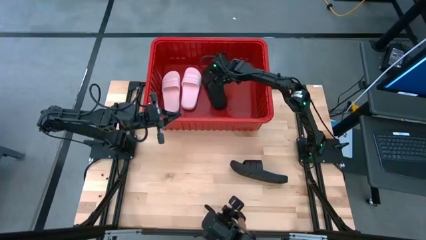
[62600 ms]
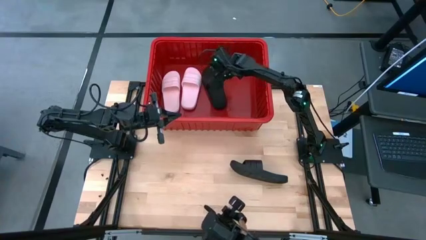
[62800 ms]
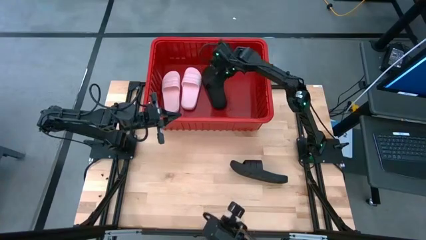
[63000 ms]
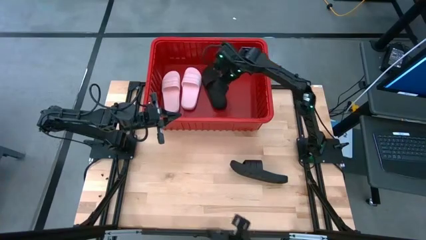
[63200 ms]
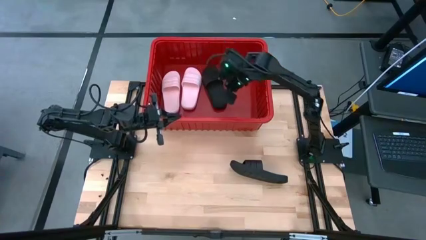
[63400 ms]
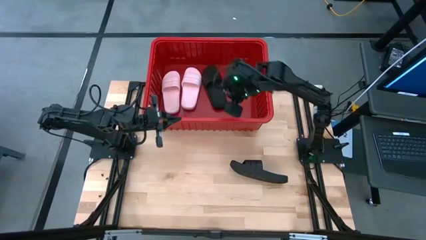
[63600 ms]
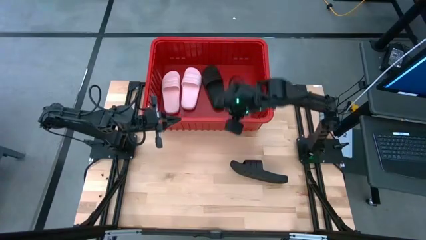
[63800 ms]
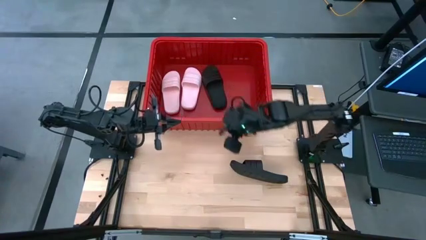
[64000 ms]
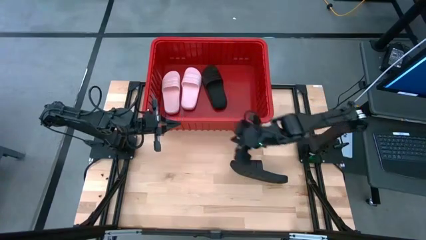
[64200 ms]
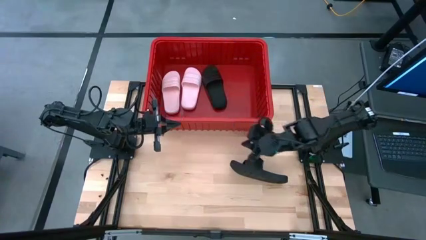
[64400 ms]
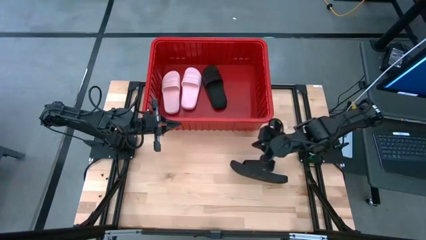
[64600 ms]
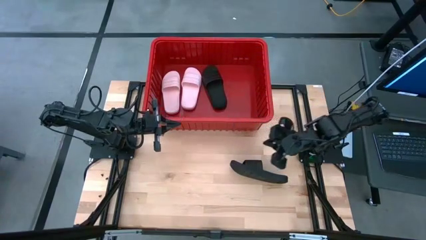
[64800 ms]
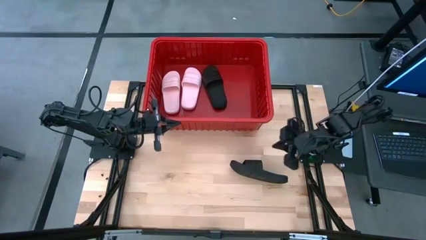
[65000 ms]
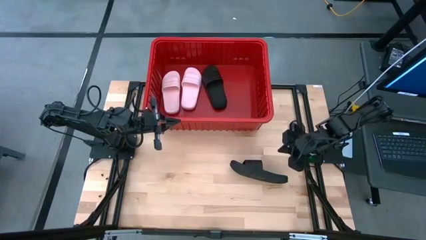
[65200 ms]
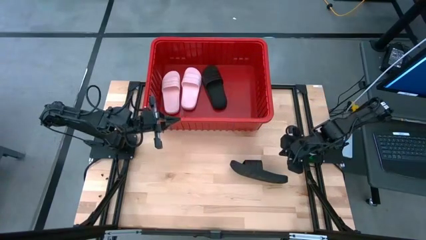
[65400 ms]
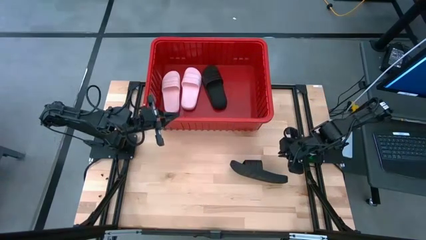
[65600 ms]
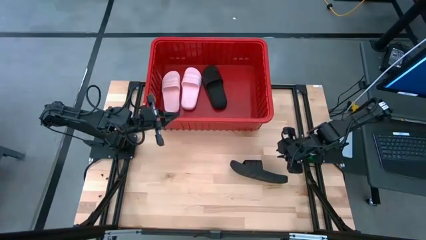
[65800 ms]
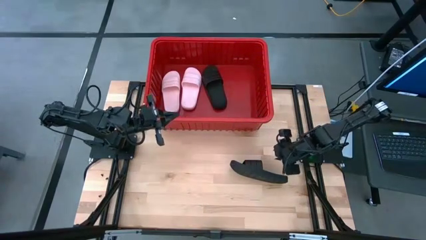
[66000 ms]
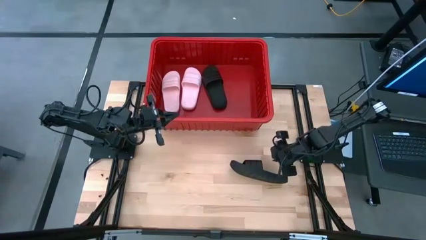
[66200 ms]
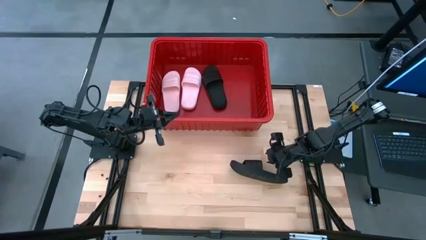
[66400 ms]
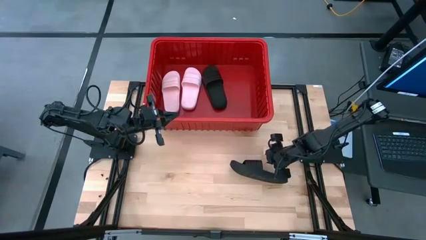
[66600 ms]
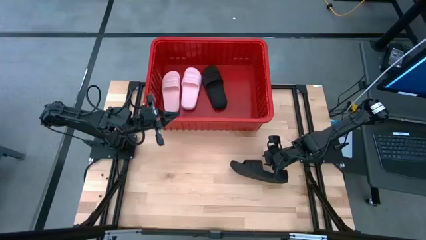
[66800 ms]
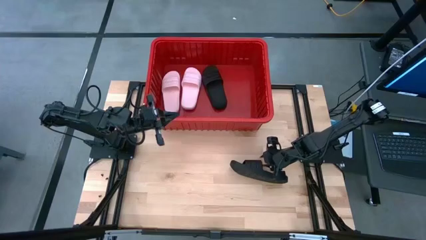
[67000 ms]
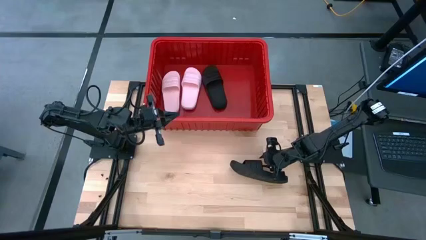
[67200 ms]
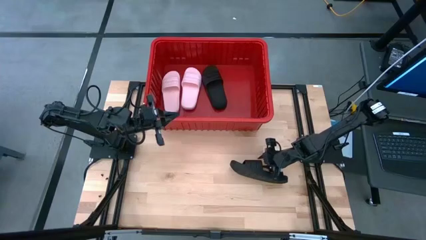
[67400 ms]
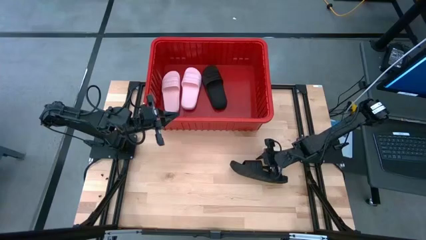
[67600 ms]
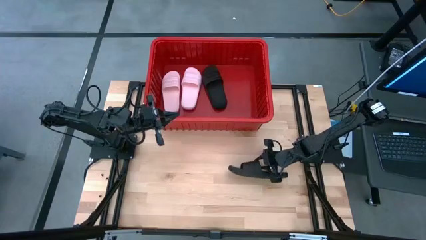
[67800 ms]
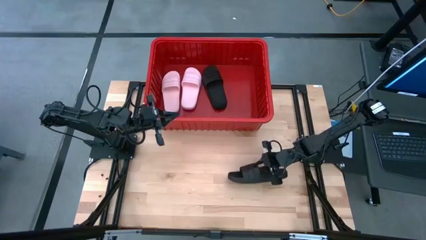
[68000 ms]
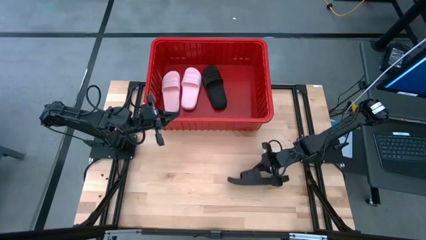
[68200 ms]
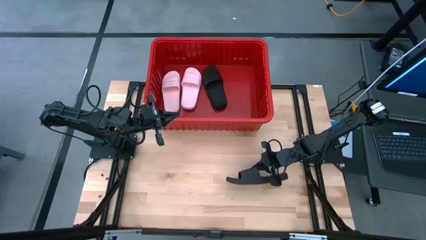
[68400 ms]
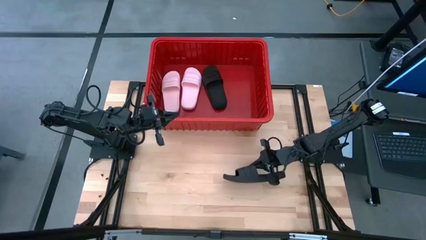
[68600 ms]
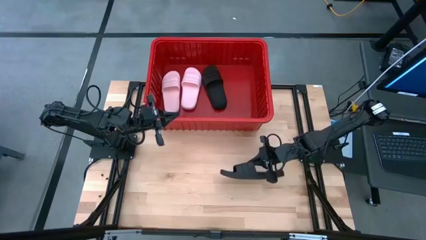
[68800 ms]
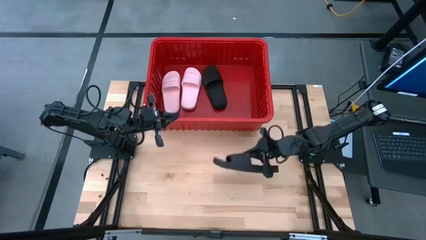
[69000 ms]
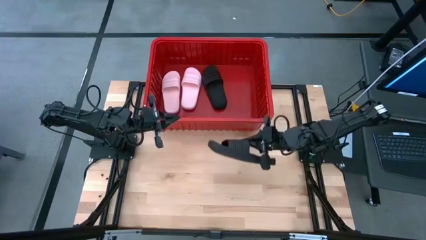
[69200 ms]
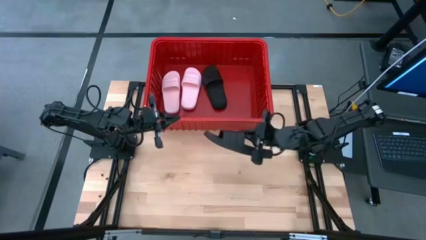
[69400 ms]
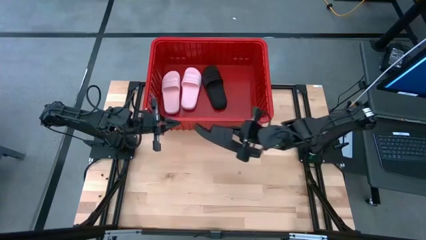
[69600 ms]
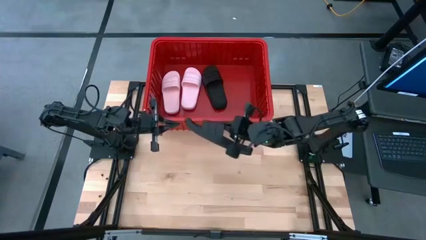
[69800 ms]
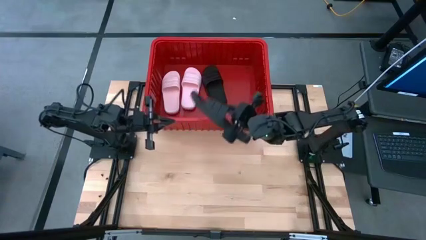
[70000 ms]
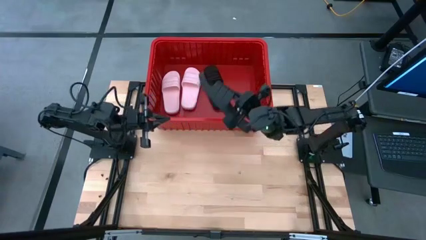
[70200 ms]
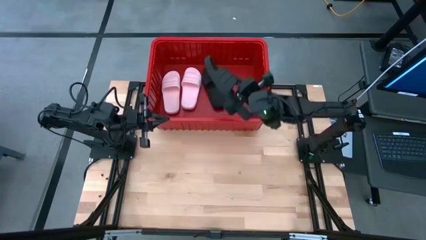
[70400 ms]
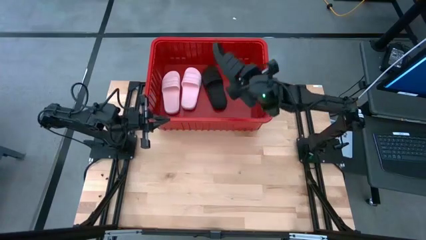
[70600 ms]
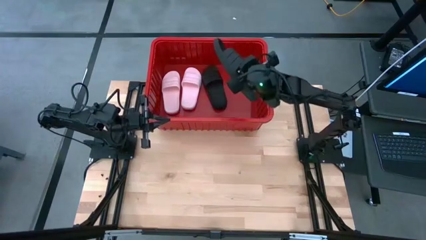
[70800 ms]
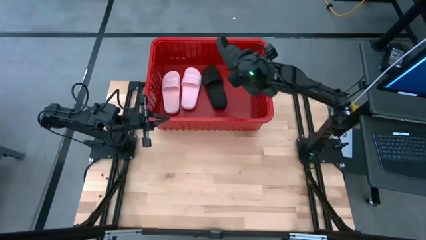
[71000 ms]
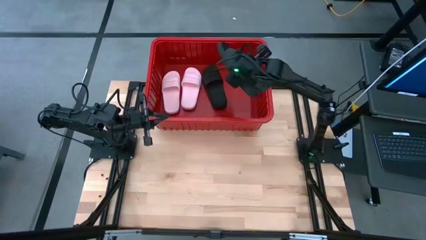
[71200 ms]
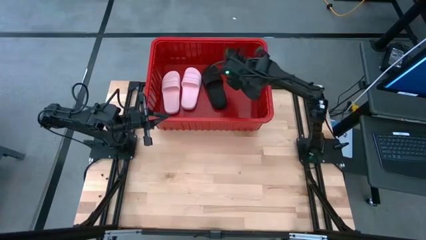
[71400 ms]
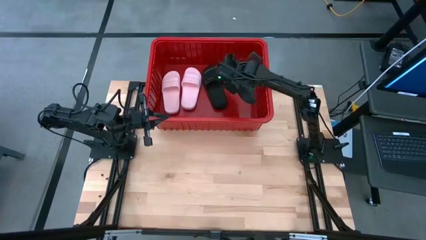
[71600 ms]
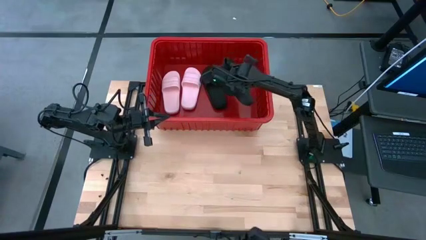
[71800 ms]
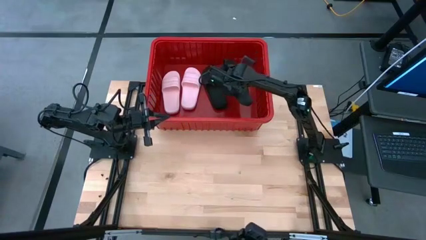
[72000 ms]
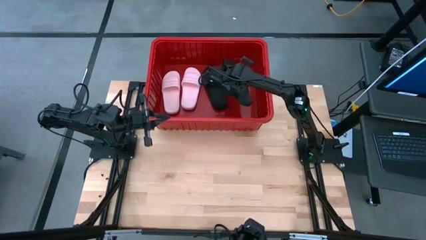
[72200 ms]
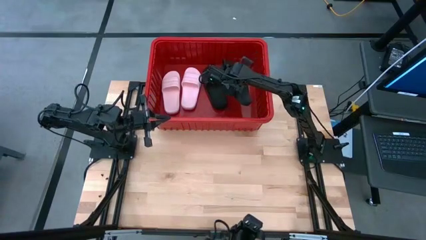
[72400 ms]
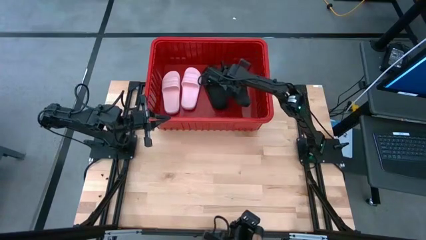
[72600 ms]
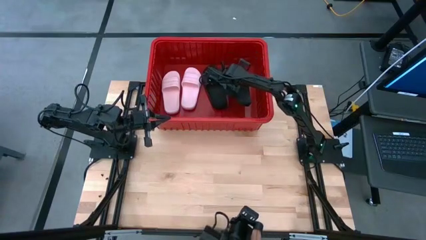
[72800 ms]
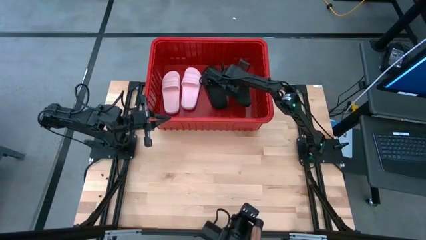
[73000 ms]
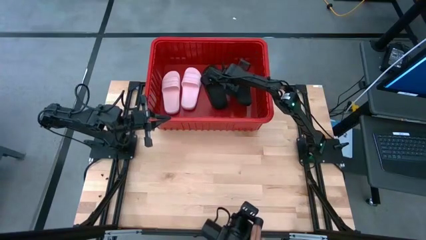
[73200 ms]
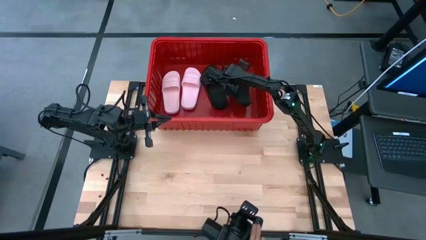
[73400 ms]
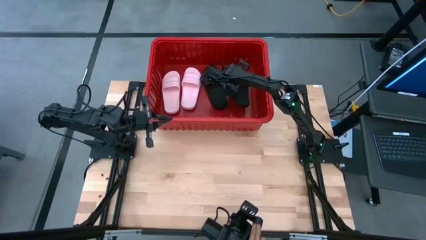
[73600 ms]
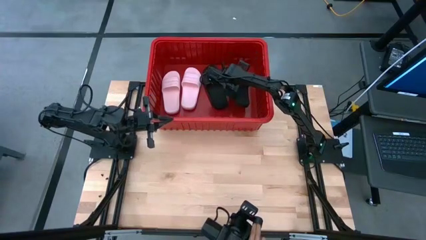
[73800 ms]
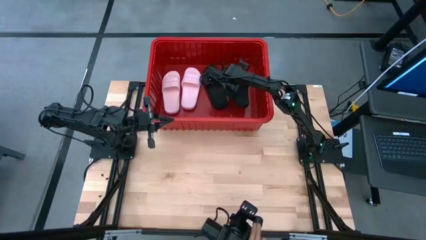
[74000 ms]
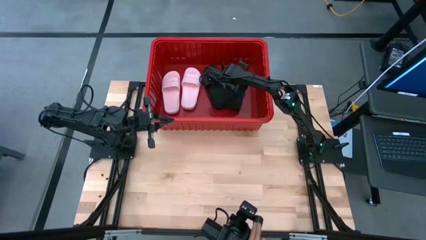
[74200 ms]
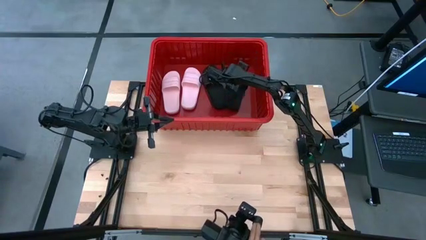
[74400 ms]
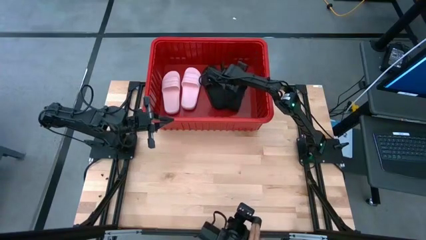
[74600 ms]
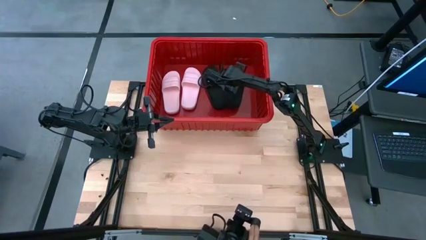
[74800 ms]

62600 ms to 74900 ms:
Task: Pick and place slides into bin
Put the black slides into the red bin

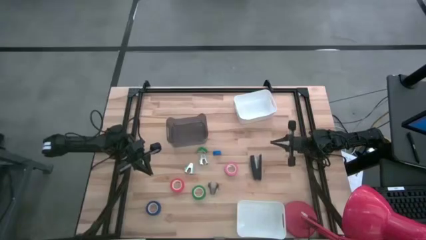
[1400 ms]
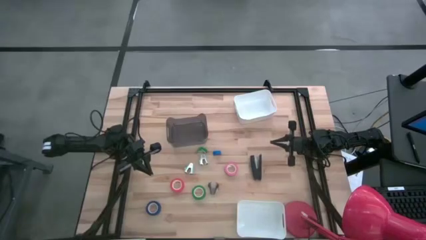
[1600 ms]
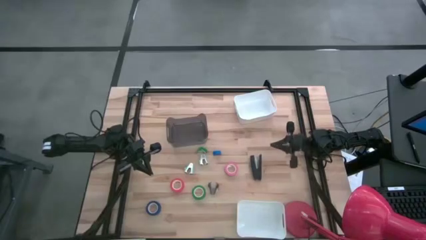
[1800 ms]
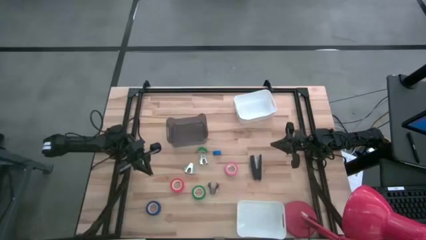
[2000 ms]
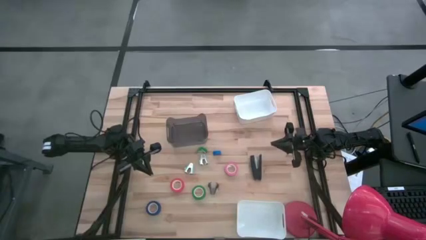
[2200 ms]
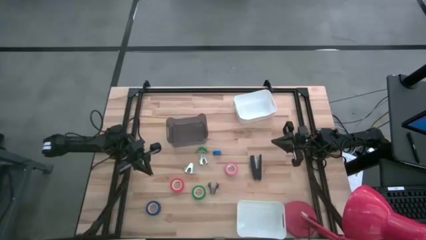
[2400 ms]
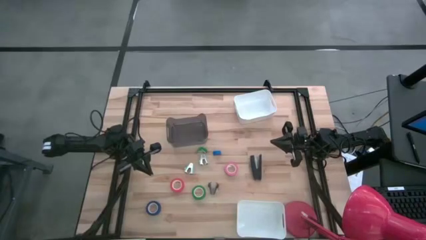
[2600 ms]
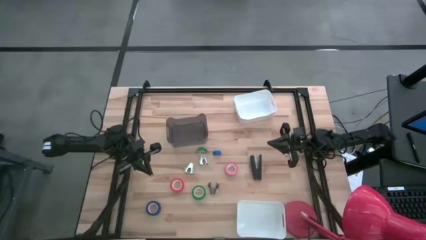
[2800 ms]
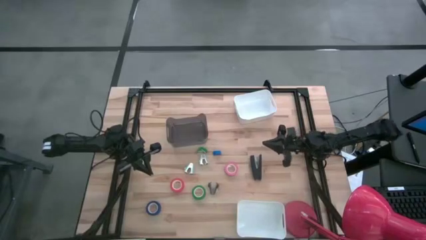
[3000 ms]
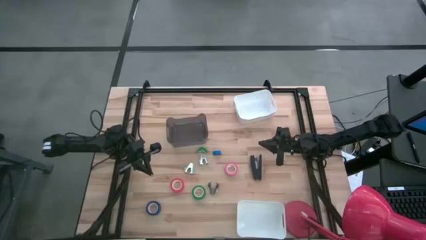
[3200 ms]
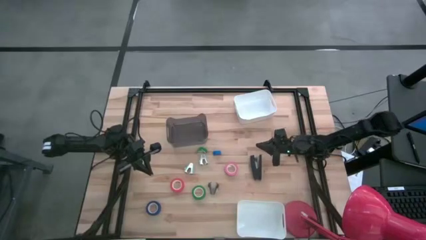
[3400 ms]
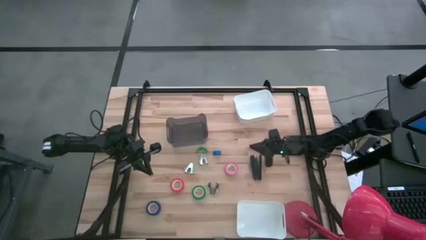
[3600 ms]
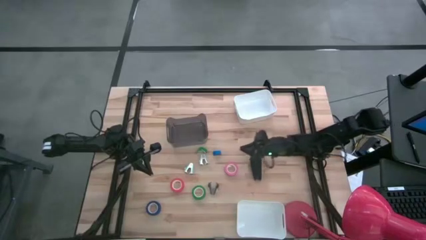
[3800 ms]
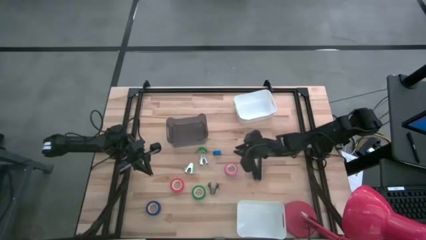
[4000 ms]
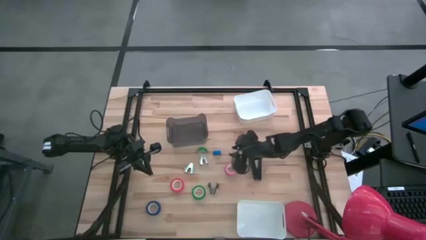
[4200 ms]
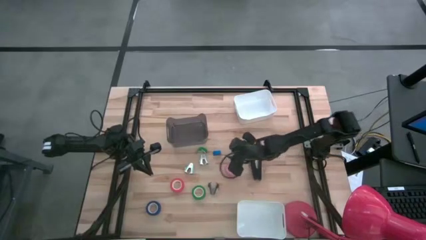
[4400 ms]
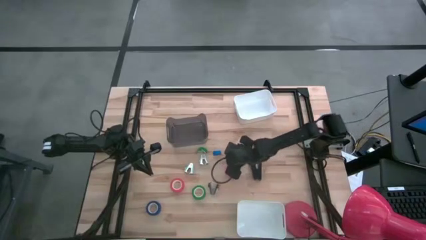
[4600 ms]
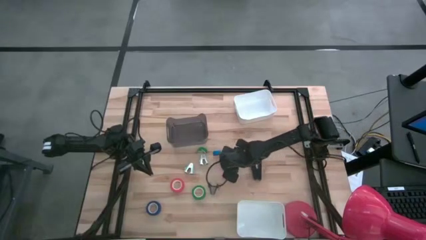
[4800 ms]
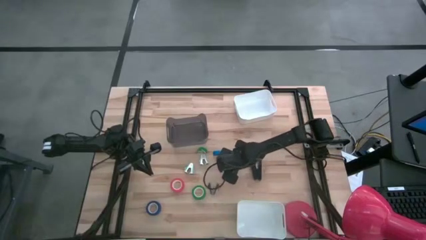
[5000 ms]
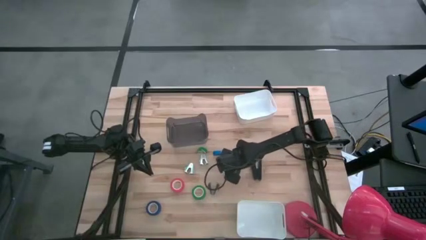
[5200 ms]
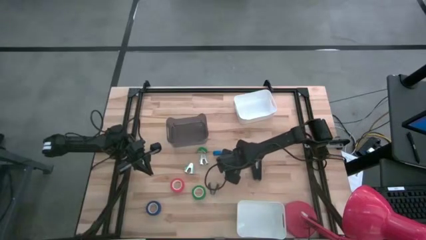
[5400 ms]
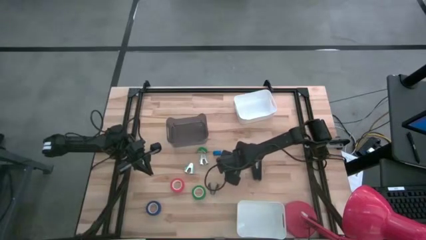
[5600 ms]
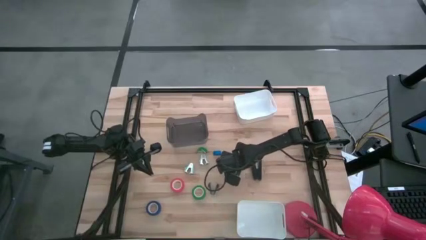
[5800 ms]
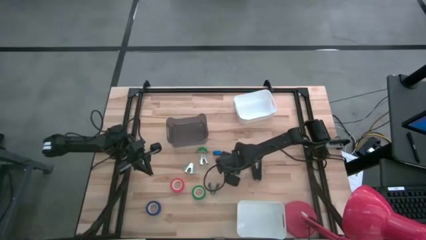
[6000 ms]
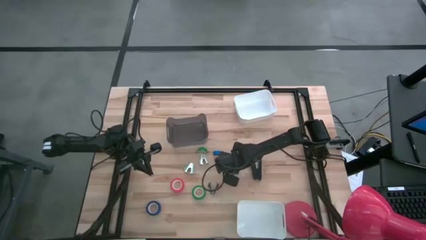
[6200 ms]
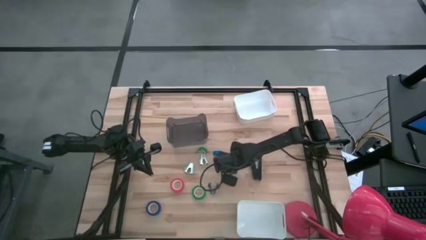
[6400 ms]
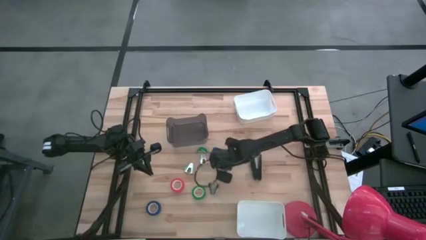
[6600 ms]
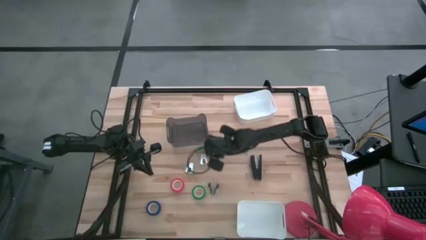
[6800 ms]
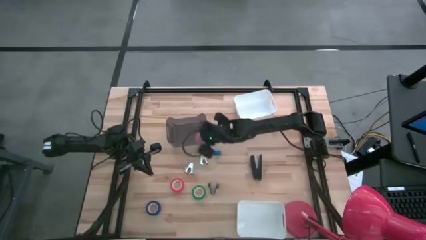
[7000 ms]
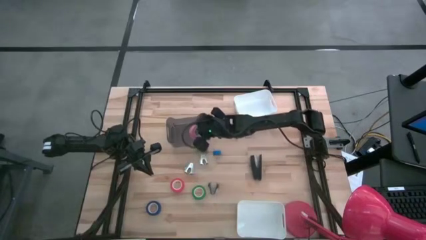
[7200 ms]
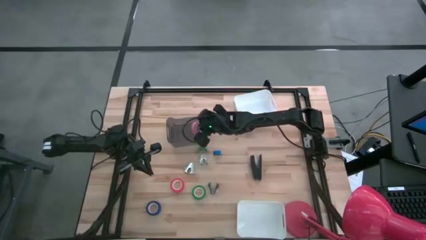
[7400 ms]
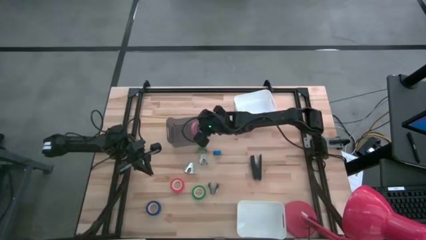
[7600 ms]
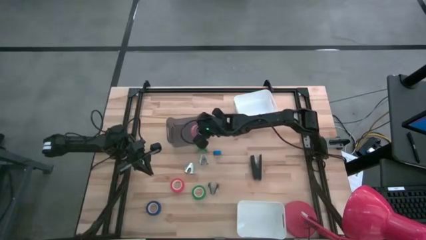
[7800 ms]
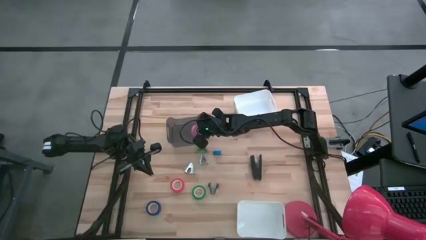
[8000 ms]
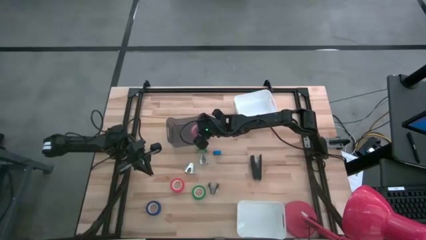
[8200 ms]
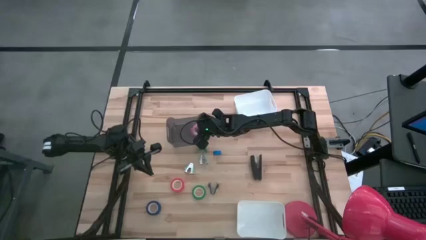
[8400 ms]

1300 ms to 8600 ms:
Task: Pick and place Stapler, Stapler remover, tape
Put the pink tape into the black bin
